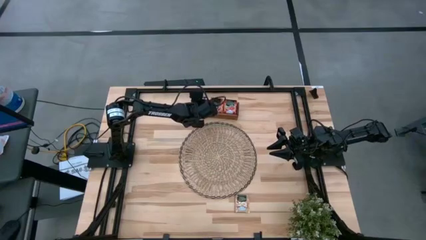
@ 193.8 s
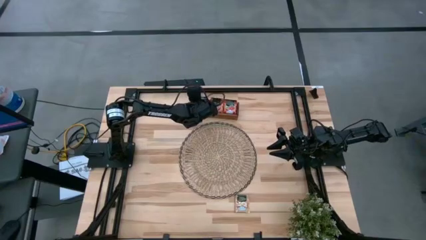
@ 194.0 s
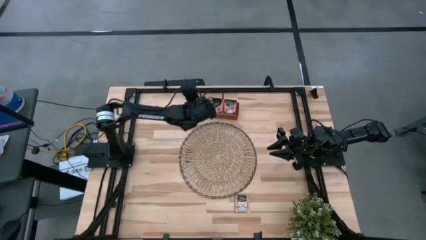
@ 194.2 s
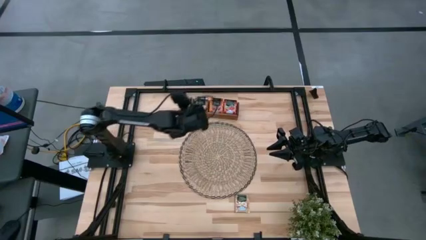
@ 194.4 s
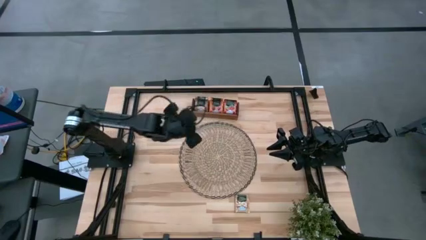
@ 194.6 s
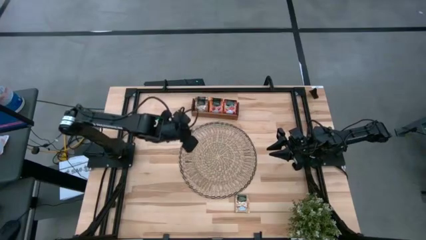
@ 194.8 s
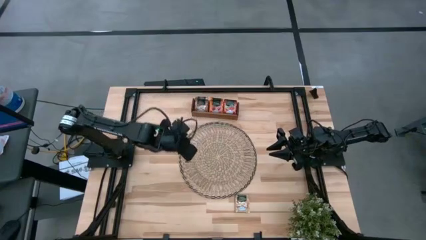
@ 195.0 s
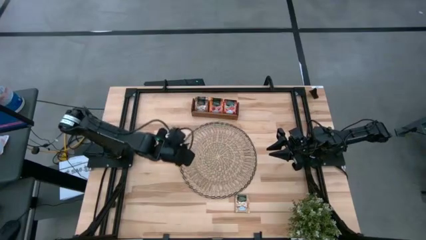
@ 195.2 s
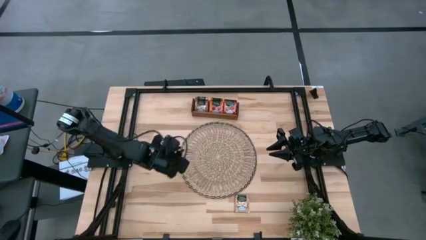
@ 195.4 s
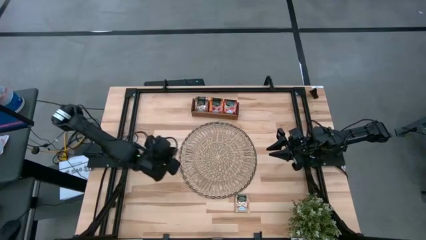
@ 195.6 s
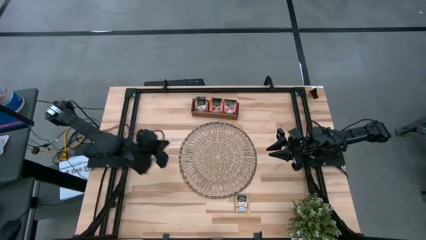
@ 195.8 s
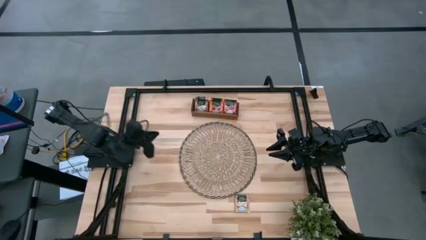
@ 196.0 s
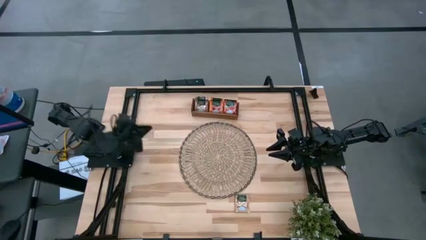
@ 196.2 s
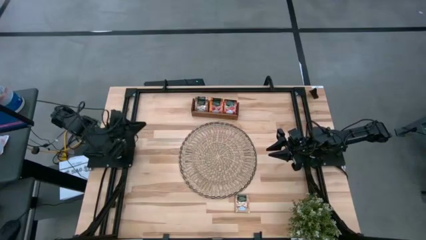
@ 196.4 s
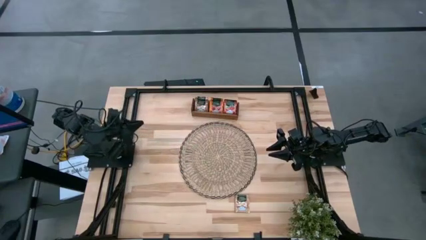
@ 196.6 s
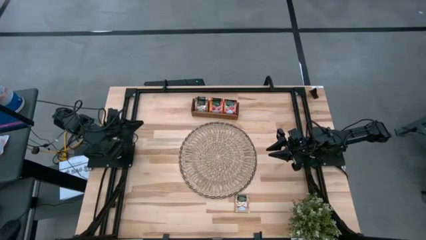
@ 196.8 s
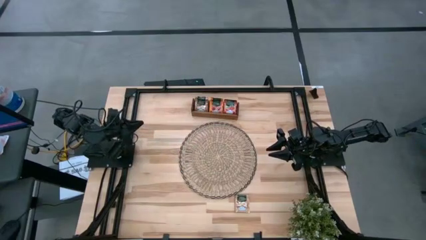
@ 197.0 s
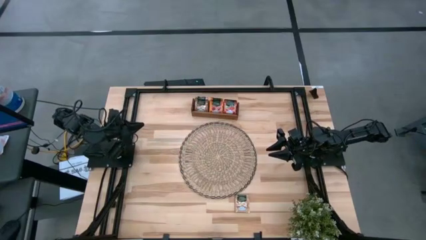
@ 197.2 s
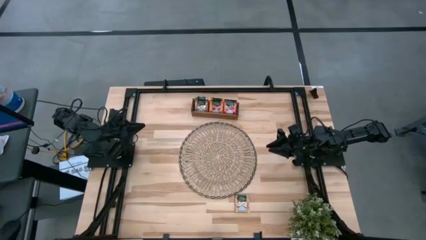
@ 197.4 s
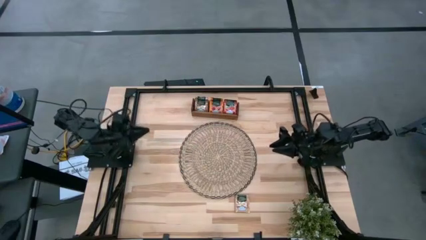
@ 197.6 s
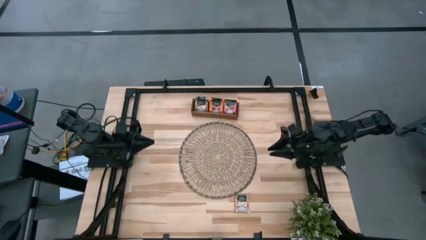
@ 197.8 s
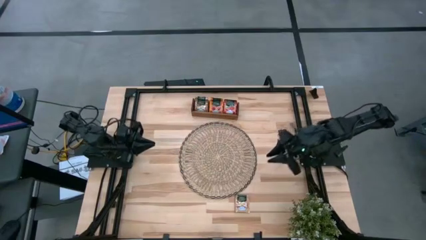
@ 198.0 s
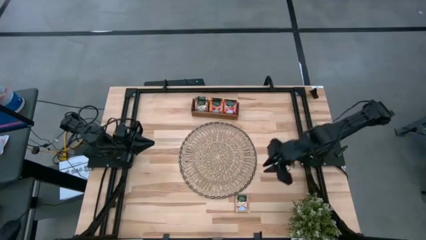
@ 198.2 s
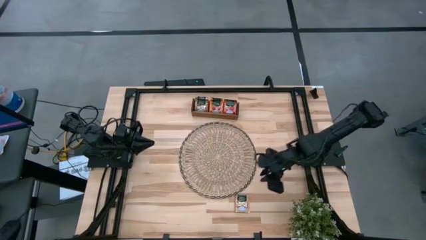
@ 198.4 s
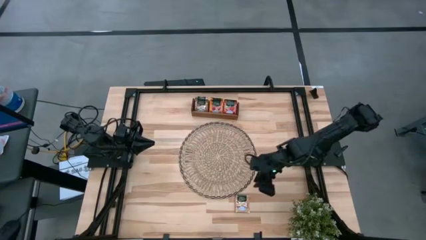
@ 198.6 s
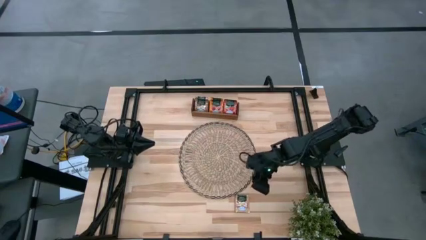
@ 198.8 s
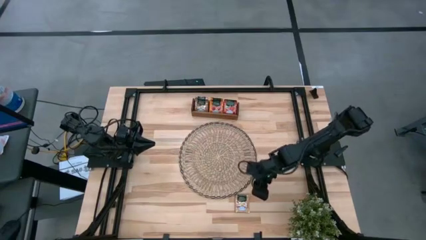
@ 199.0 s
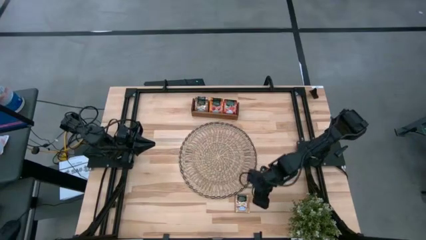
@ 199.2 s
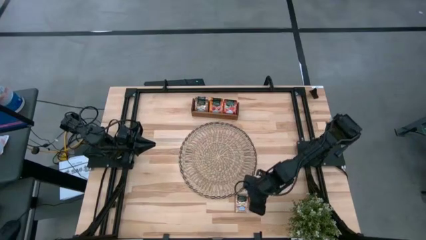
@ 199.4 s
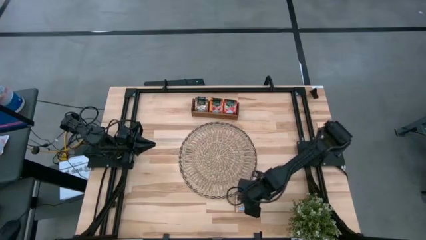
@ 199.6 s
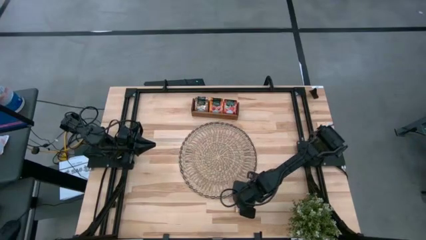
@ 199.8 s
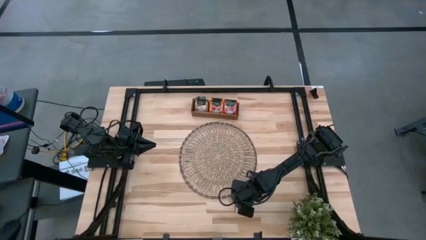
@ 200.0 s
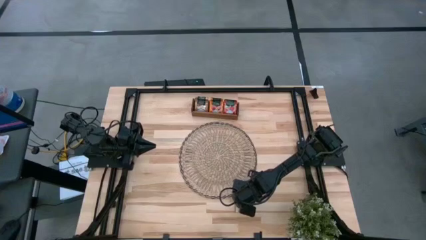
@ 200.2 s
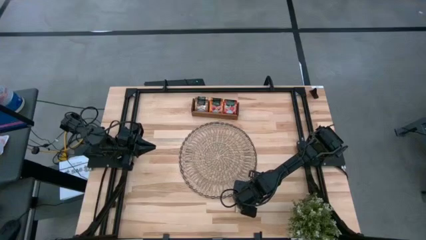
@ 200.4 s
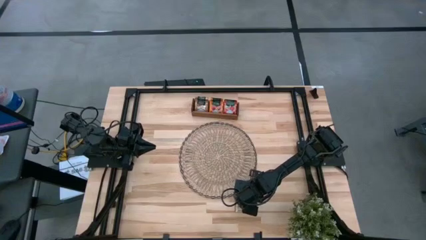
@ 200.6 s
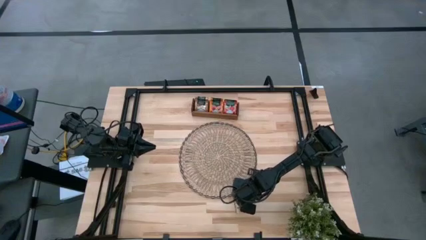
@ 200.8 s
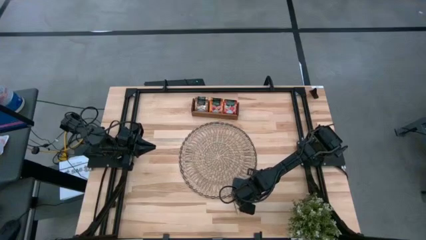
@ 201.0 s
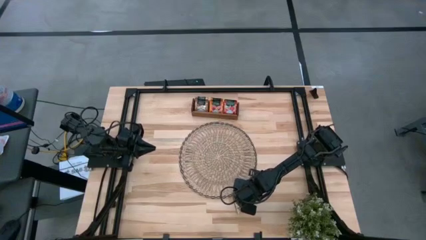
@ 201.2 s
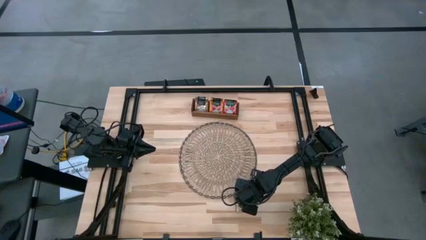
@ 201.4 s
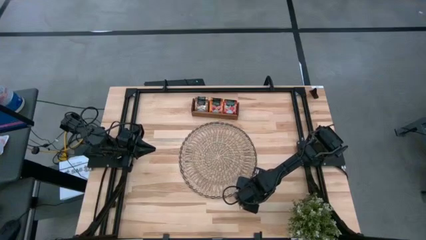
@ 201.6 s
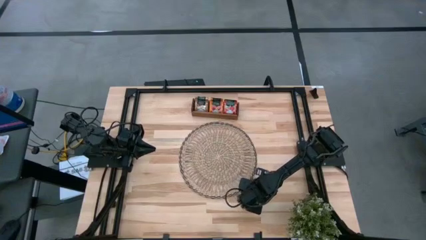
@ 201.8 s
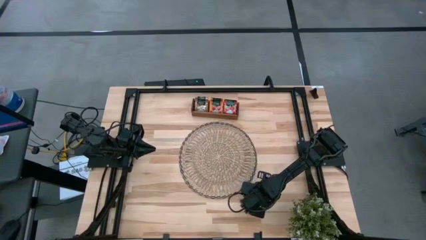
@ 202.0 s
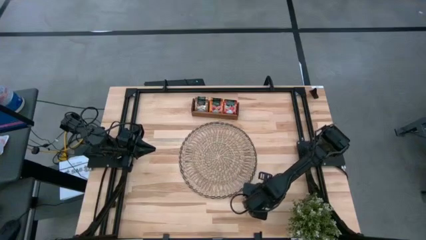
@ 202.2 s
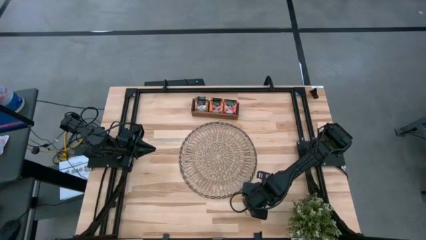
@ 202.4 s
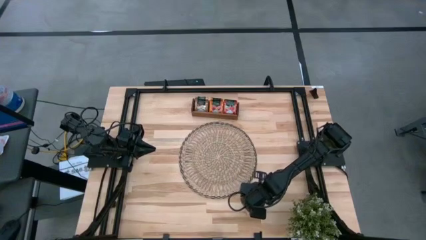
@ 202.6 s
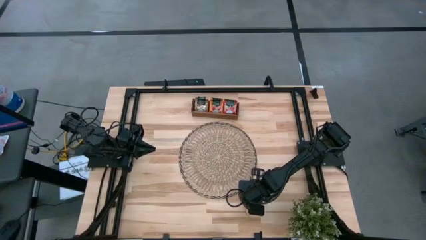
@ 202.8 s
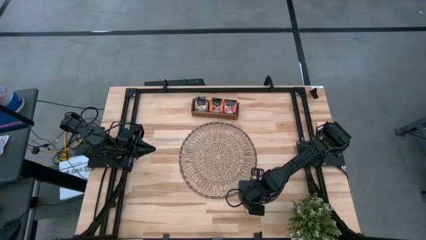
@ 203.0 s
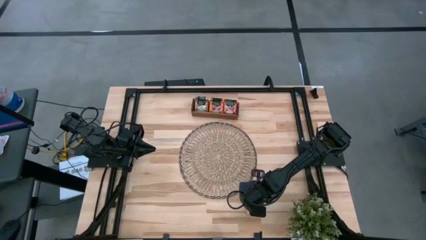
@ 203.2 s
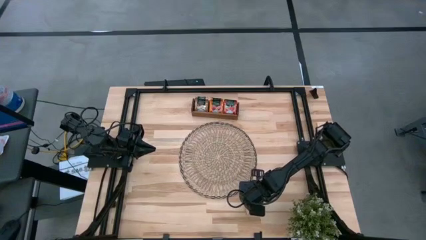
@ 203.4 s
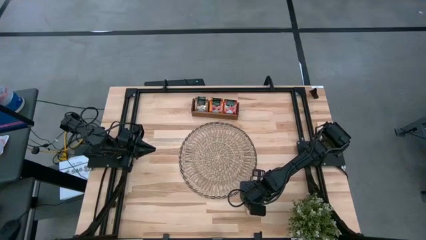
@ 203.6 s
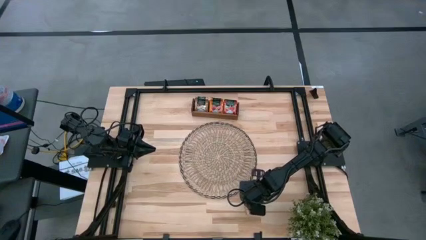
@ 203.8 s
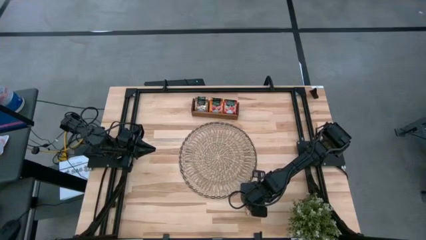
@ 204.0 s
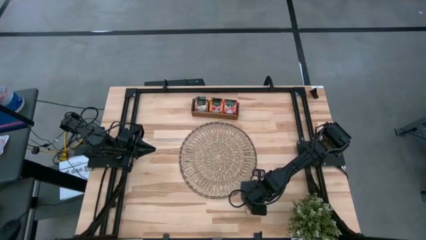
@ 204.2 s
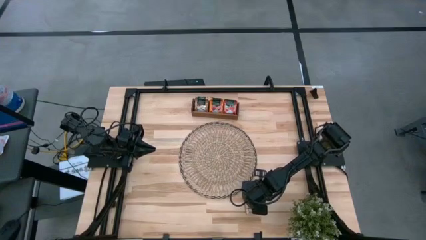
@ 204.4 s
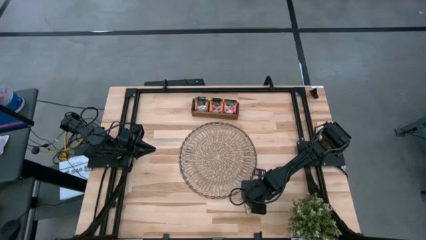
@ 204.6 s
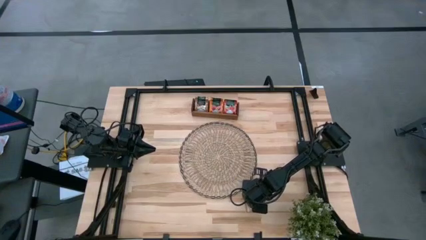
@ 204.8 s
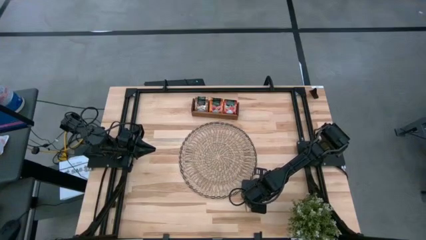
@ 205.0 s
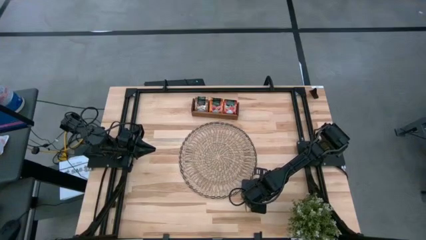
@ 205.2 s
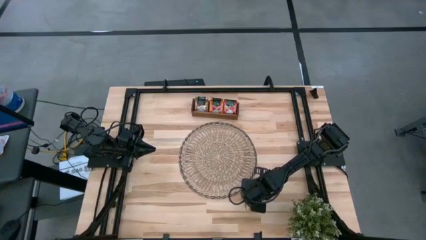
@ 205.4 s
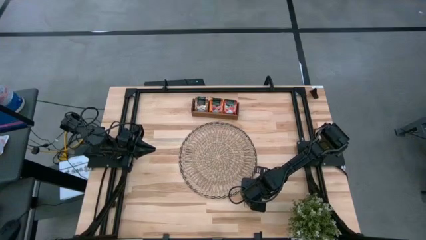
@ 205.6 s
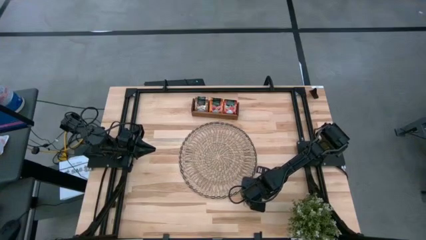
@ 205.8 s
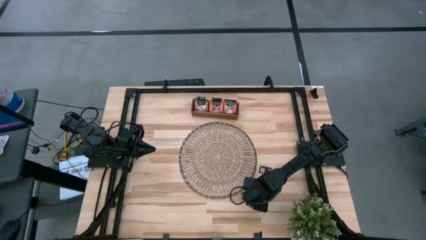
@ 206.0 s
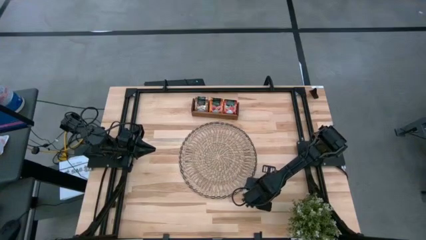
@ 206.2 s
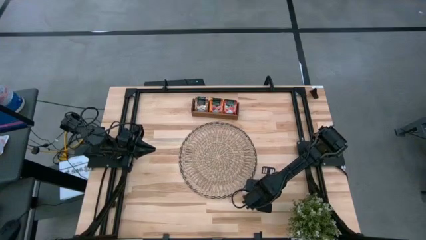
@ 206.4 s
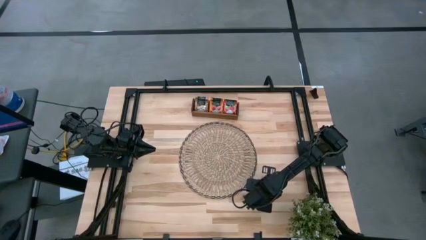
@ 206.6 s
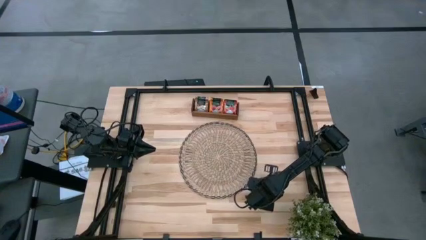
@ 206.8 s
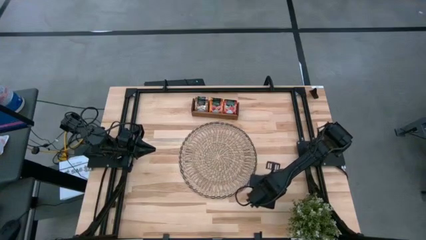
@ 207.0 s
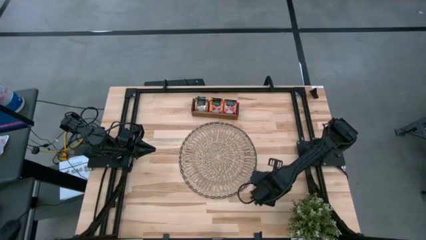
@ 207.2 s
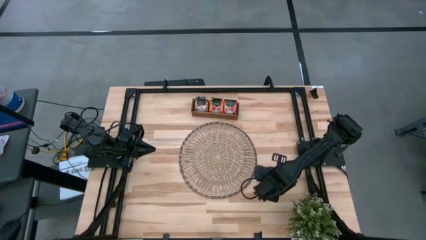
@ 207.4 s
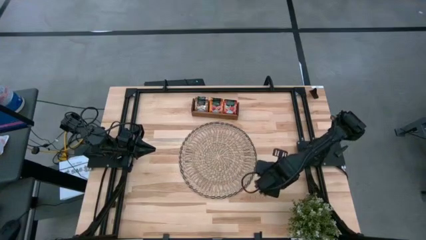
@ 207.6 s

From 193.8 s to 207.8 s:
Task: Pick & Place Tea
Put the brown tea bag into the left section of the wooden organizer
